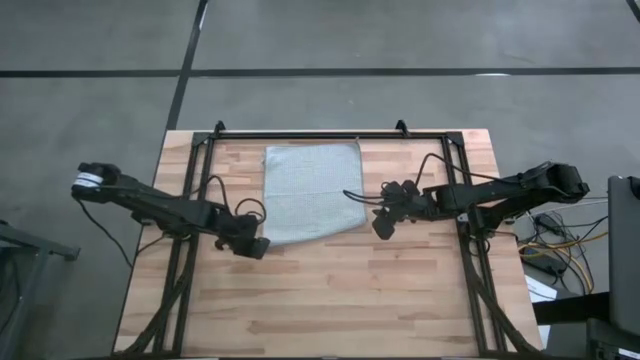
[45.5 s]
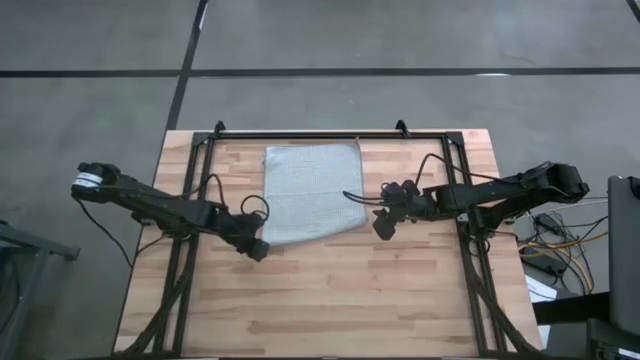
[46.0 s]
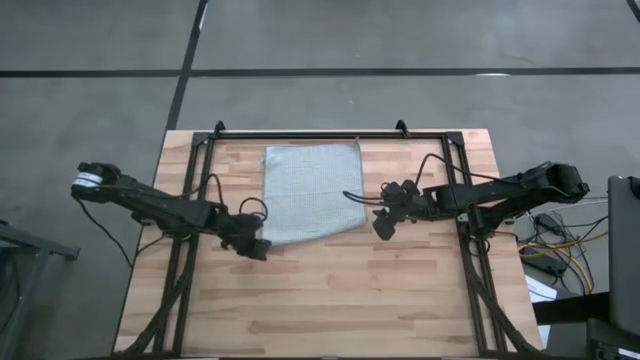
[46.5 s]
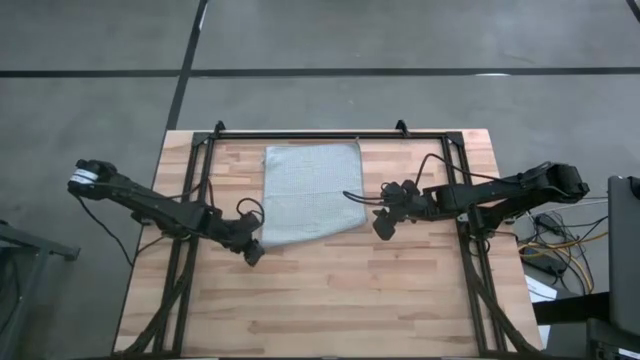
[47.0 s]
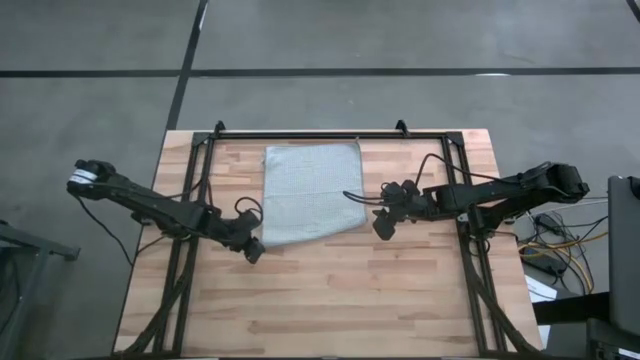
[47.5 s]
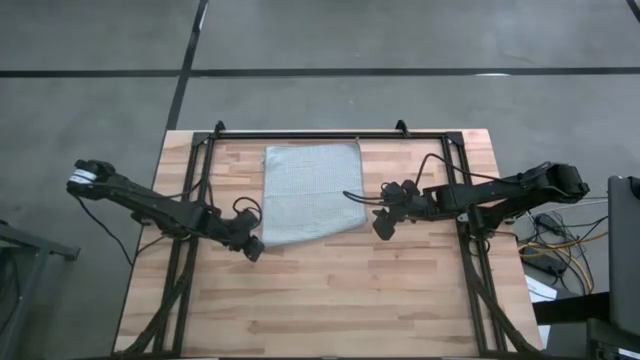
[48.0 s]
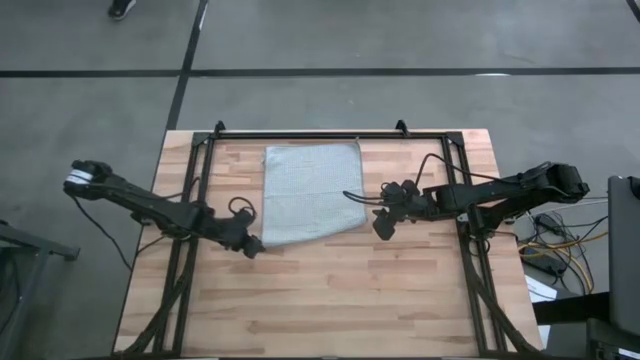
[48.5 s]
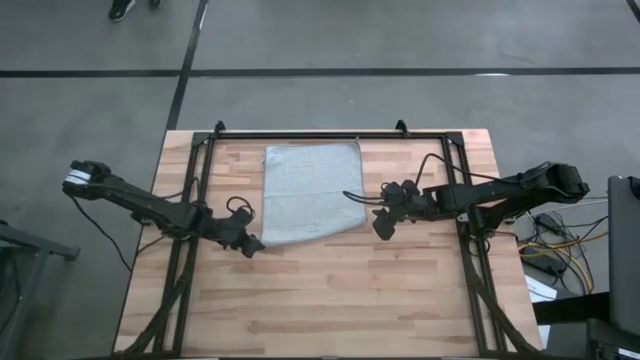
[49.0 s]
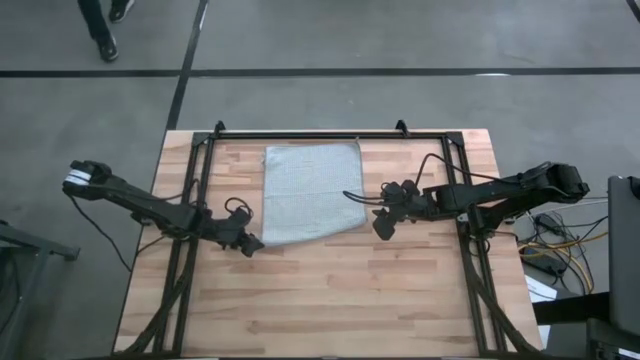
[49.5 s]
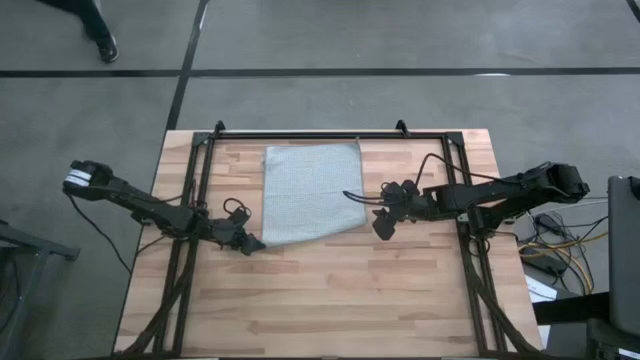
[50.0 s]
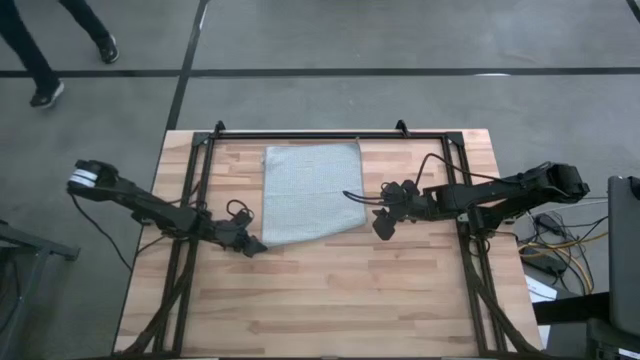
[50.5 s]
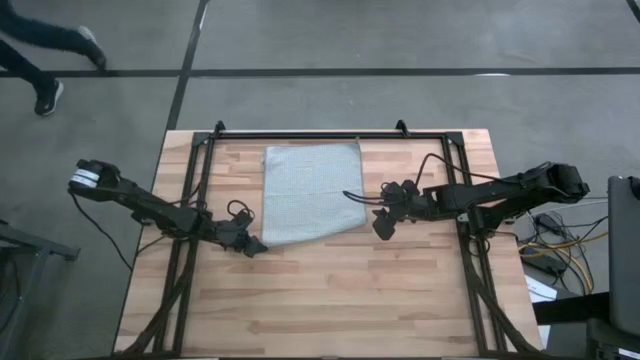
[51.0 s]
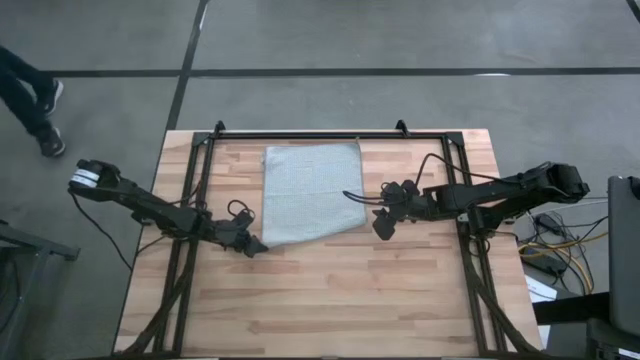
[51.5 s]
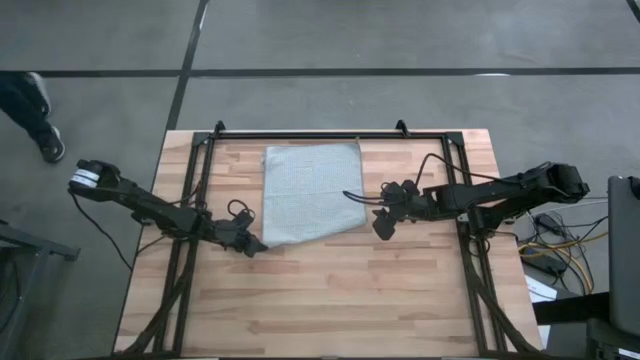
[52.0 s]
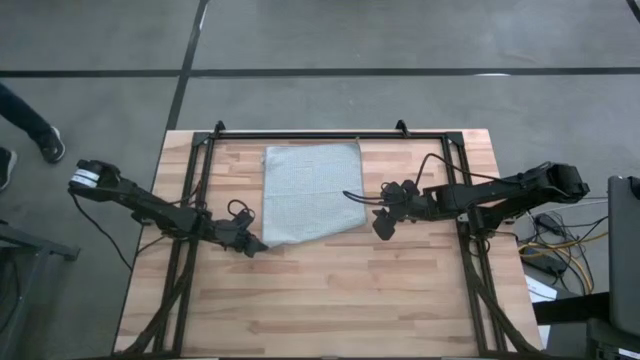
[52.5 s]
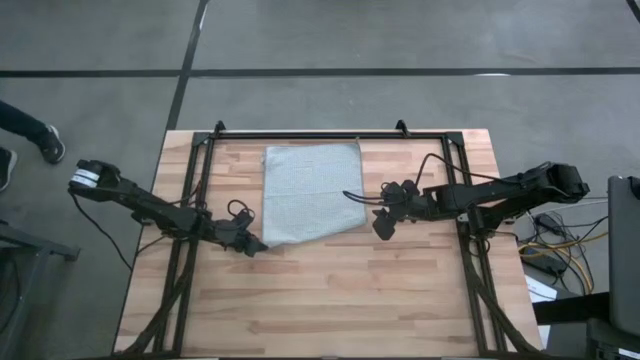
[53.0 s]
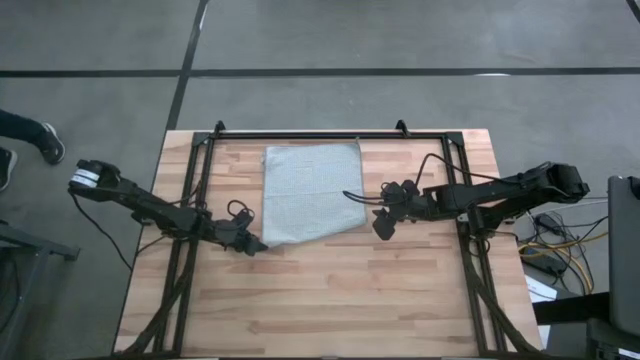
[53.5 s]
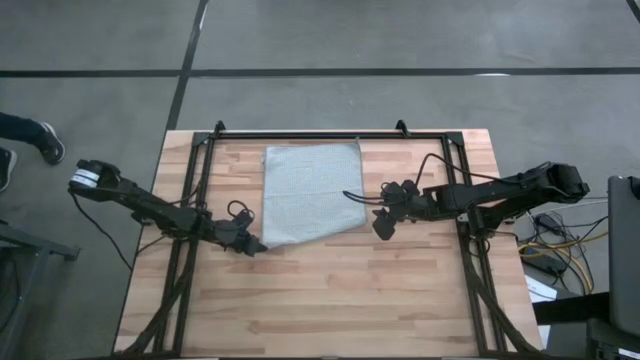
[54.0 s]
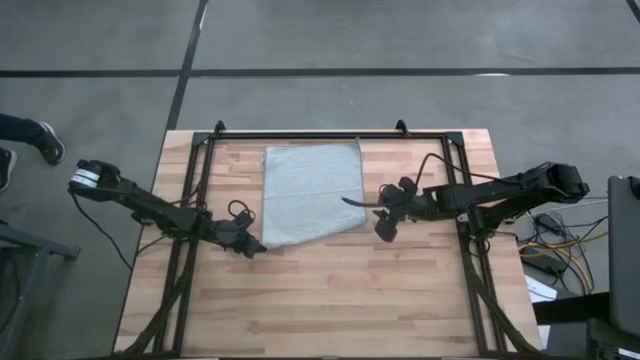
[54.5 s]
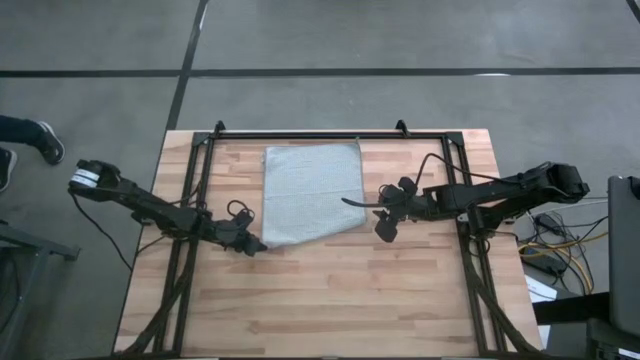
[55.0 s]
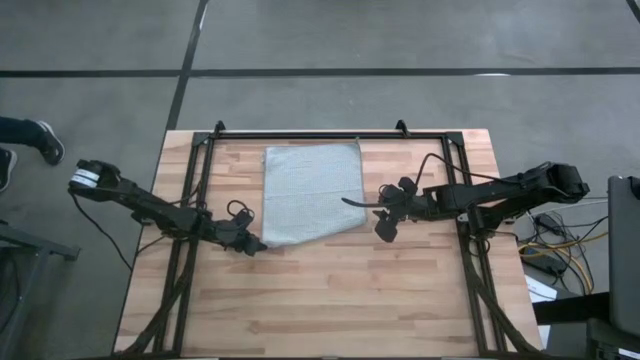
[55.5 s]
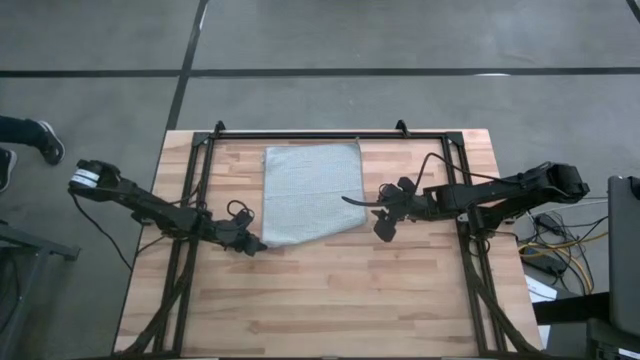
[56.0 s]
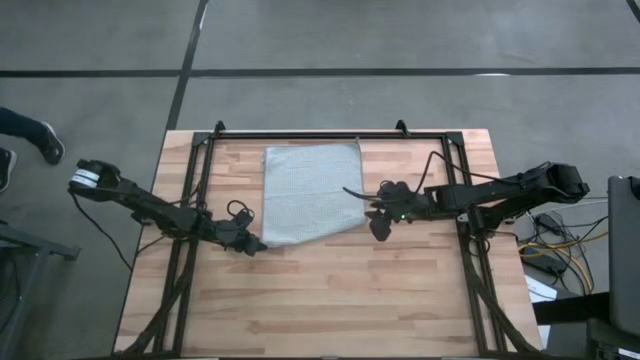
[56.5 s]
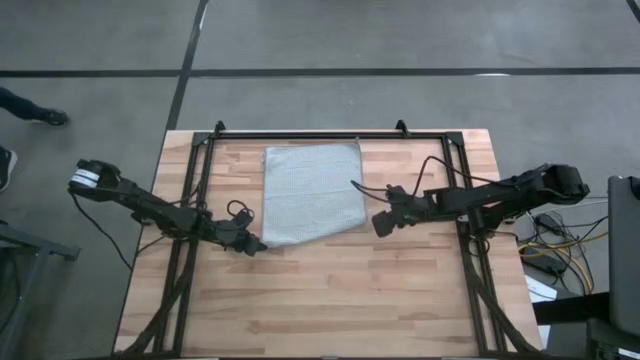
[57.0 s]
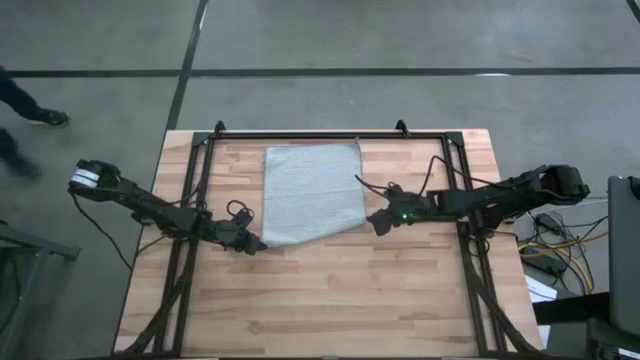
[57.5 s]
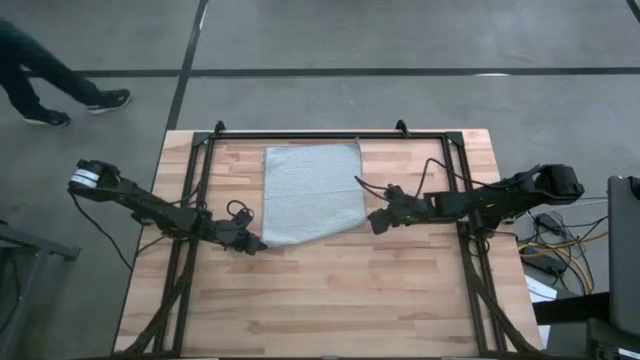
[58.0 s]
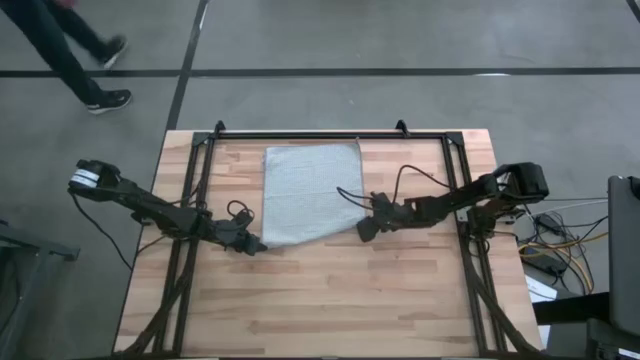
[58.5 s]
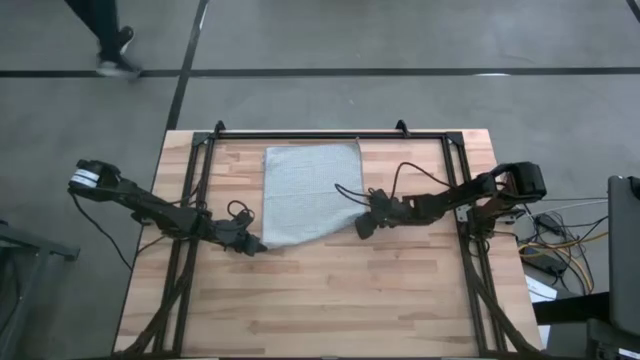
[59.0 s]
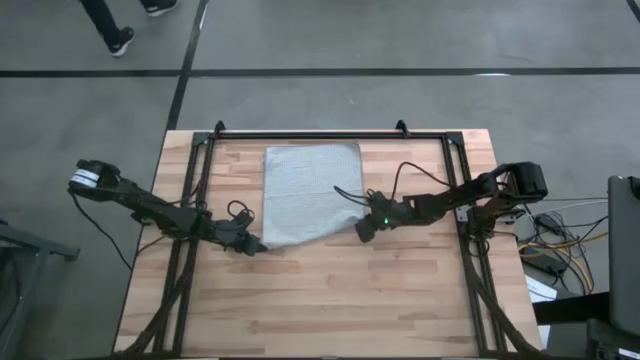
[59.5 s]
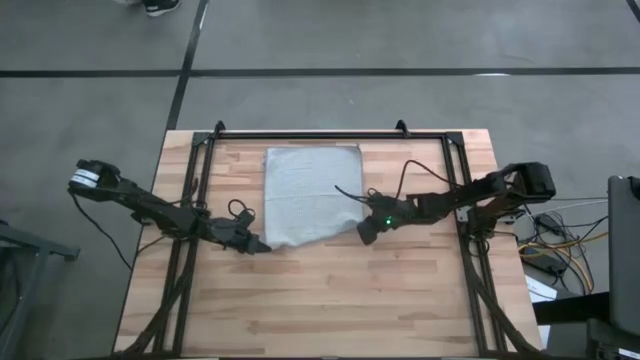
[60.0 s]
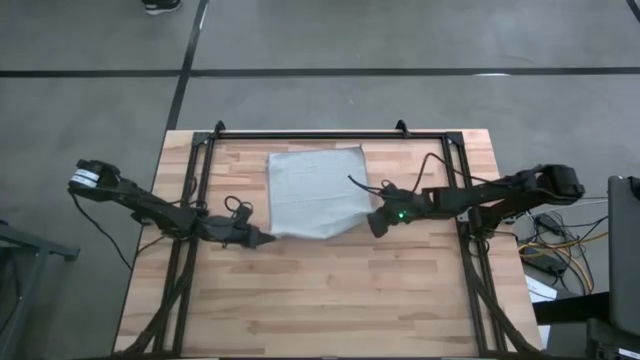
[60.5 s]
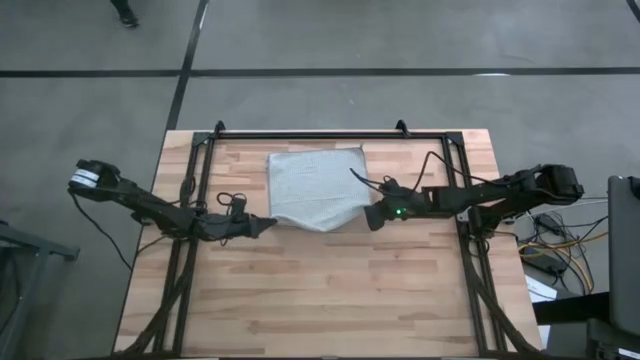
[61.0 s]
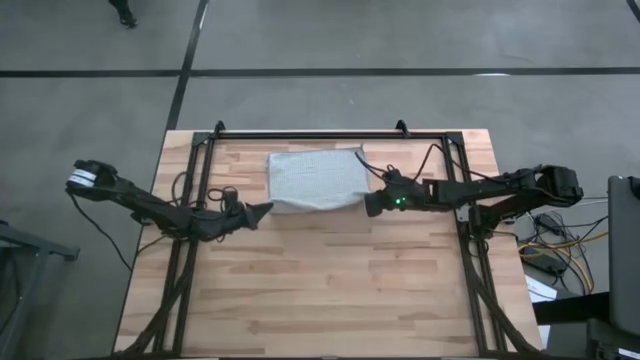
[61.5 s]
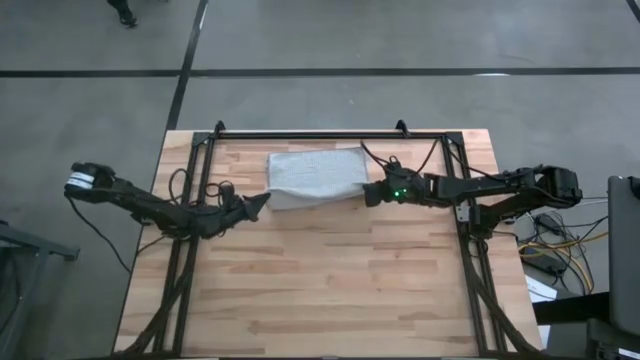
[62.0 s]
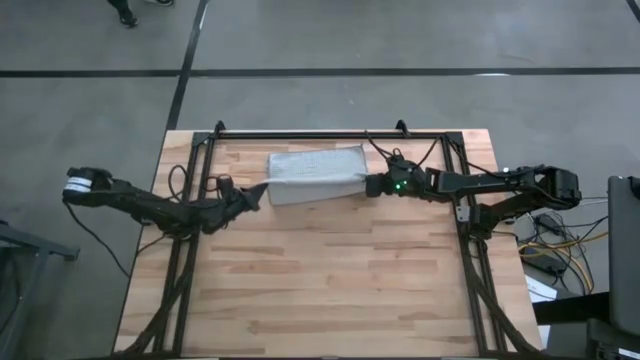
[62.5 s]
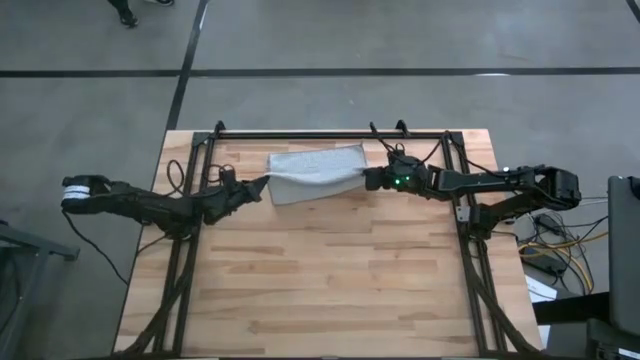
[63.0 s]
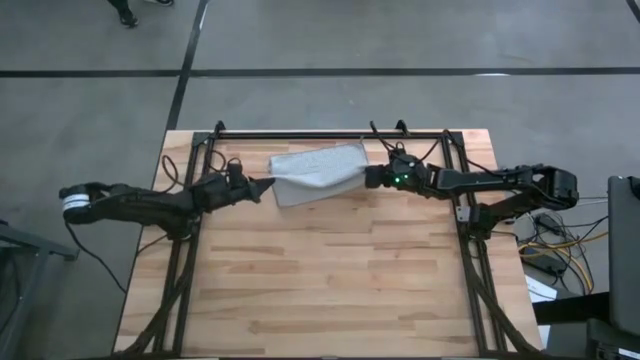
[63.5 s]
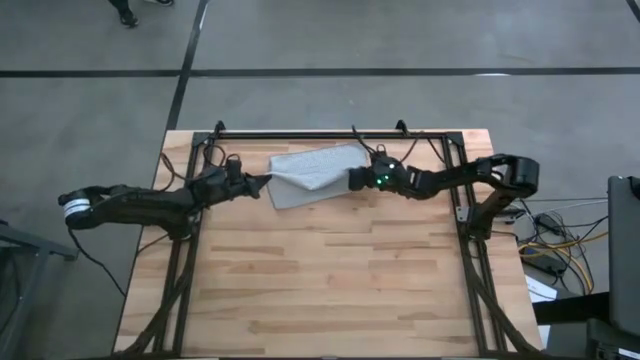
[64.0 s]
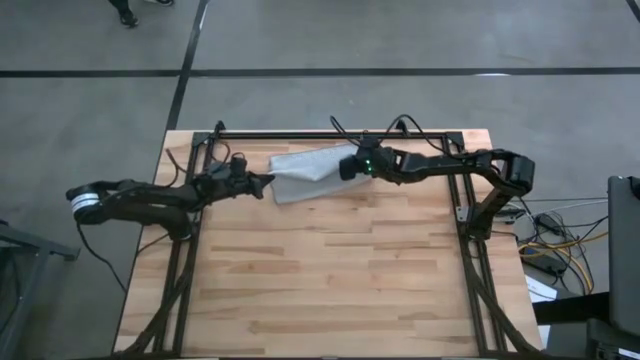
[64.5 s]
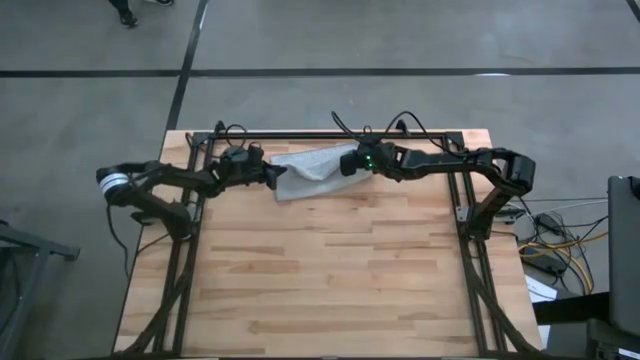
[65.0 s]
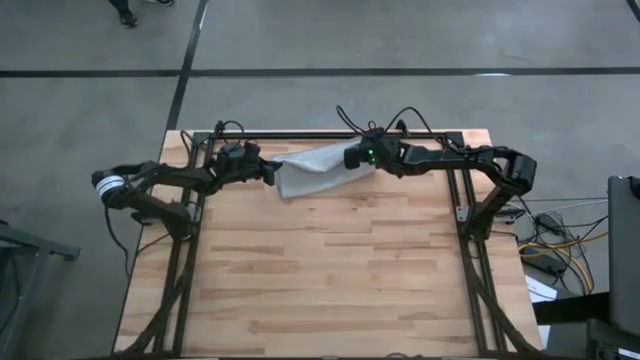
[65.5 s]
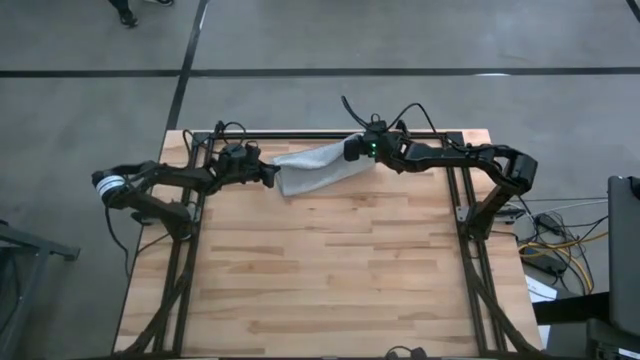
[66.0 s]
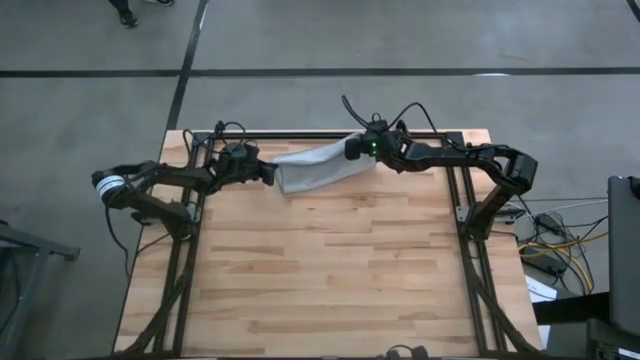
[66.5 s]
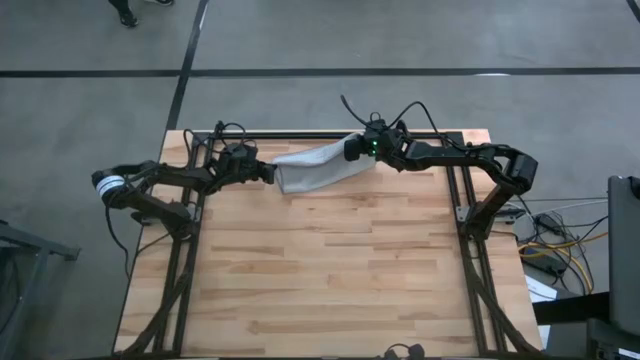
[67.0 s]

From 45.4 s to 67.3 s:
Task: Roll towel
Fold the gray towel on the table
